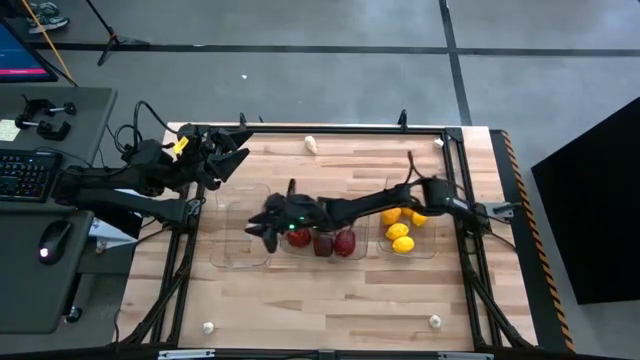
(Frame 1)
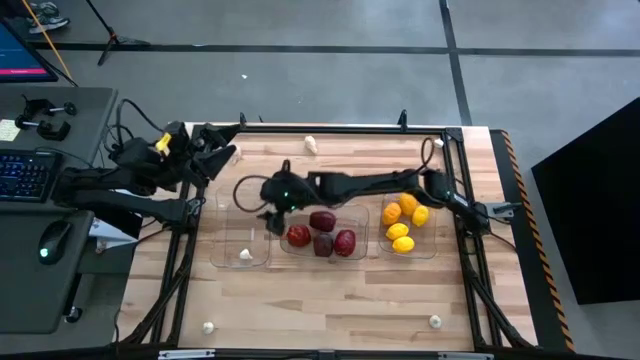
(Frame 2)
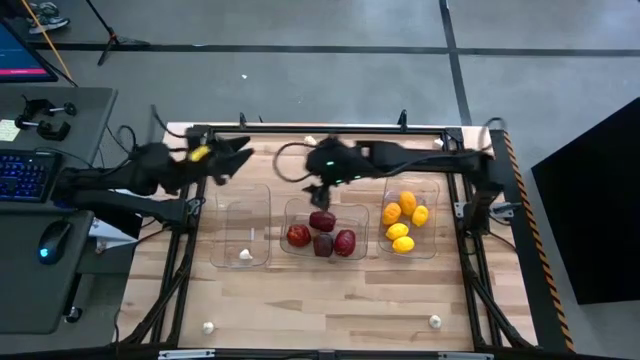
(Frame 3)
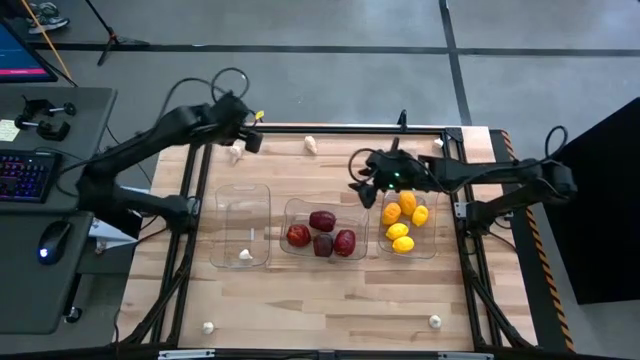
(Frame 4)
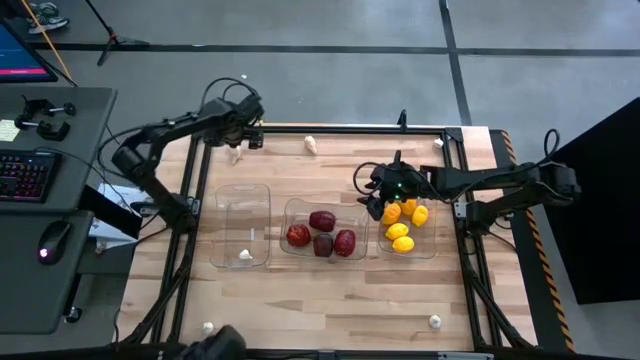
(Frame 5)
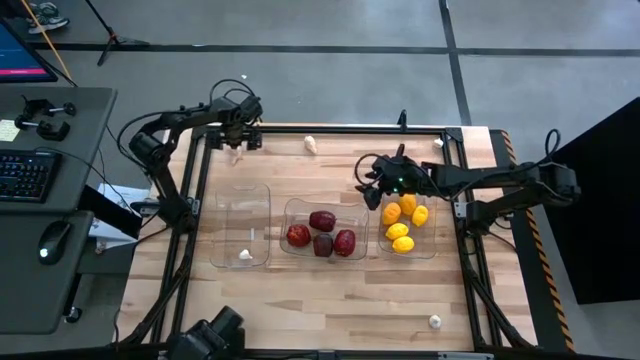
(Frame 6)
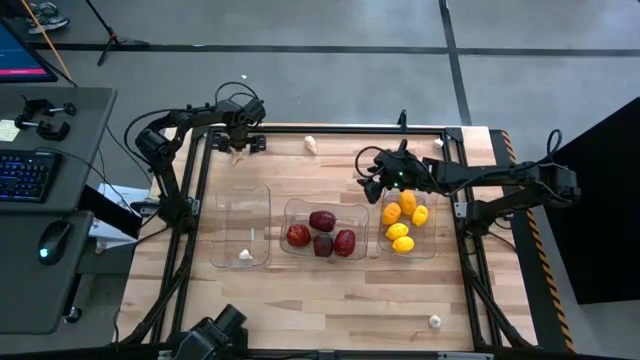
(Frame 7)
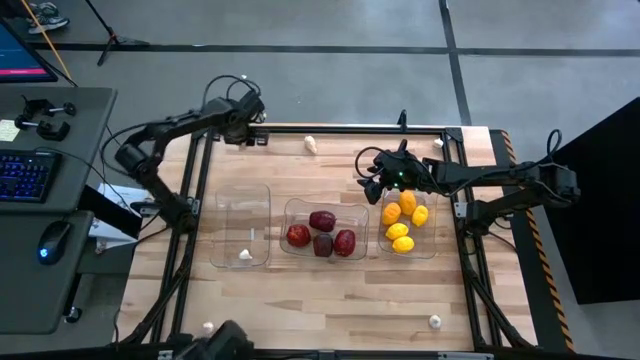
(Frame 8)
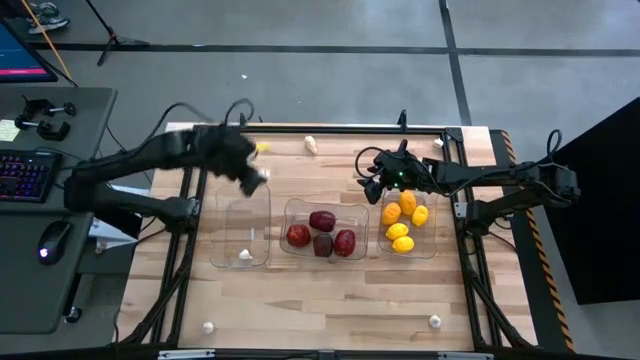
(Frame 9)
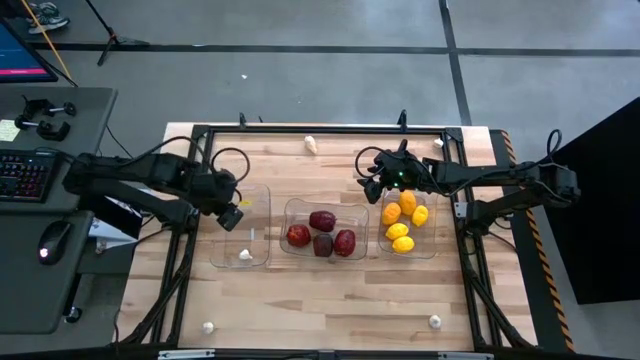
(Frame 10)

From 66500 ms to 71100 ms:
Task: Sort produce into baskets
Put the top left white garlic into the transparent bin

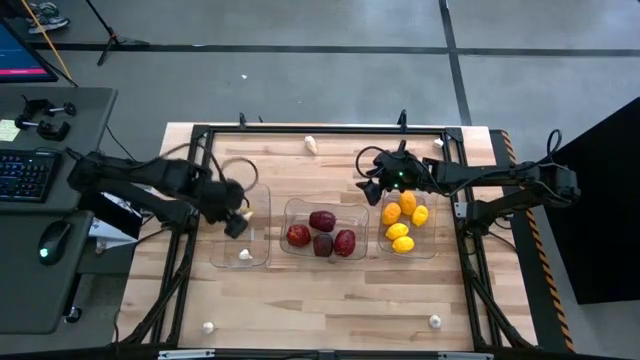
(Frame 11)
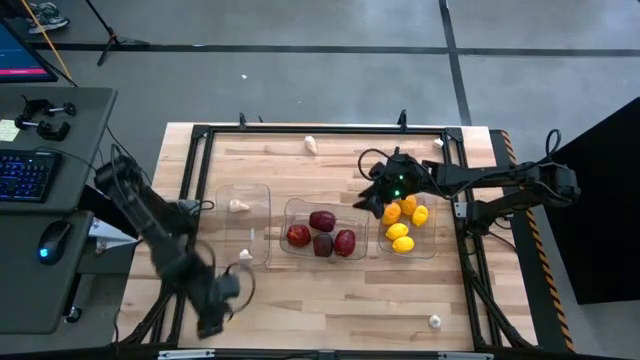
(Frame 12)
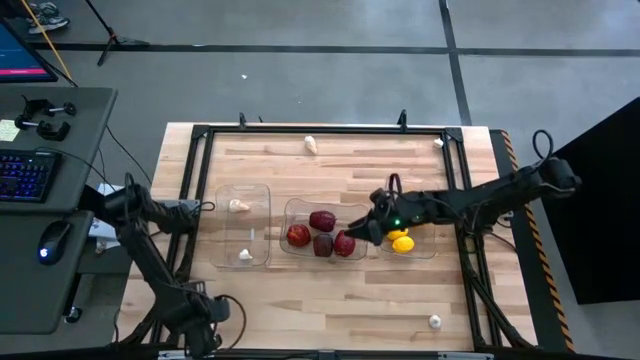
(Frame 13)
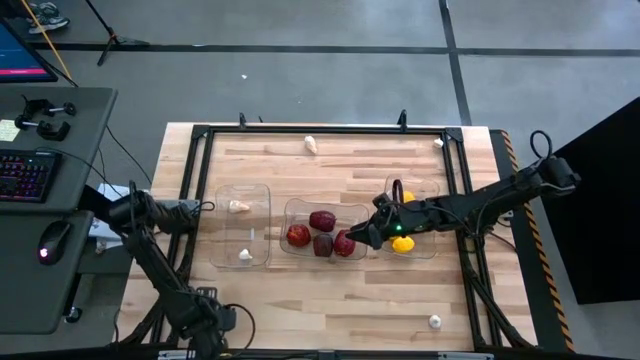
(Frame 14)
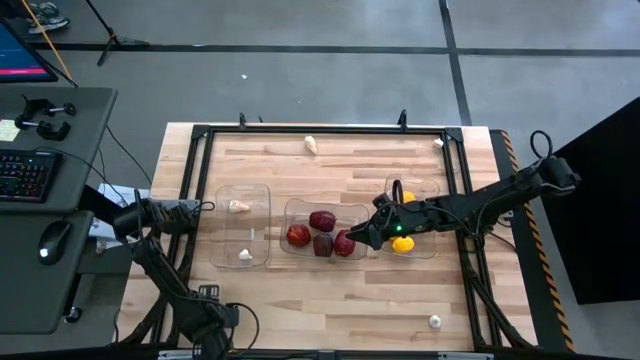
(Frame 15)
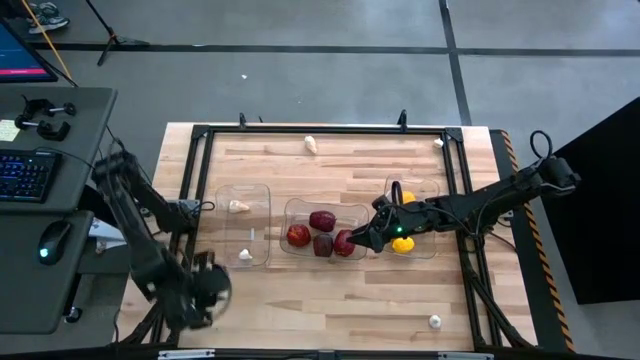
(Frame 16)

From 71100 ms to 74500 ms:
Put the bottom left white garlic into the left transparent bin

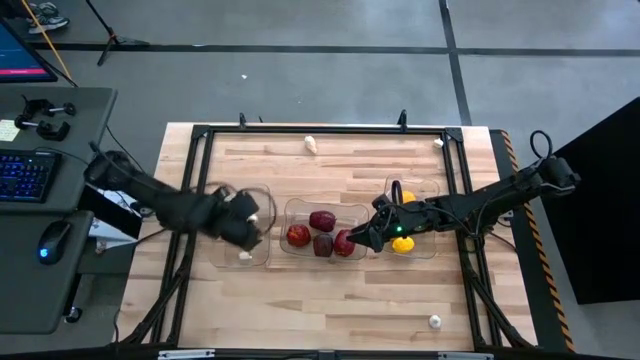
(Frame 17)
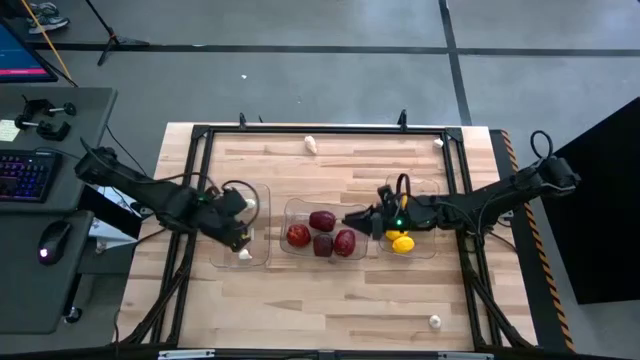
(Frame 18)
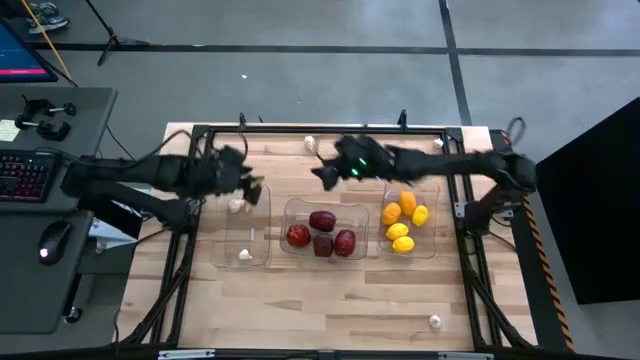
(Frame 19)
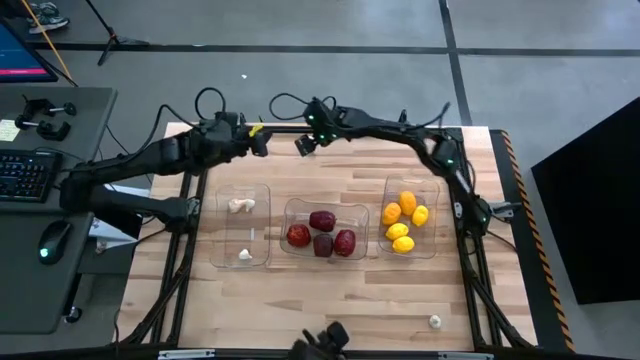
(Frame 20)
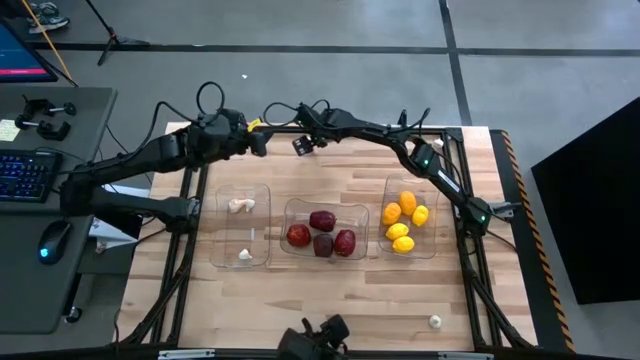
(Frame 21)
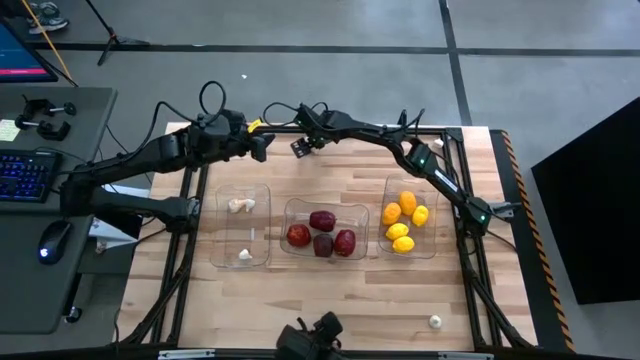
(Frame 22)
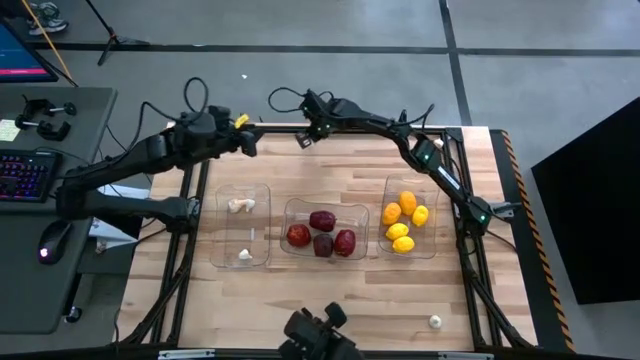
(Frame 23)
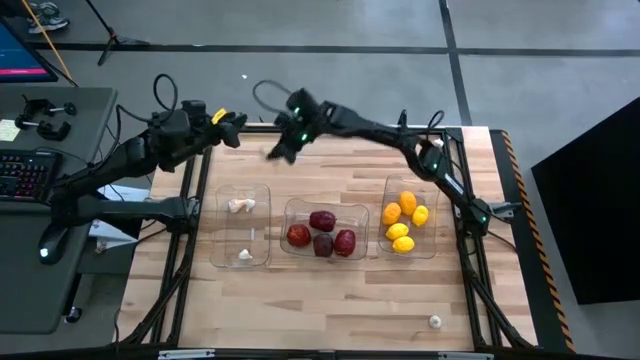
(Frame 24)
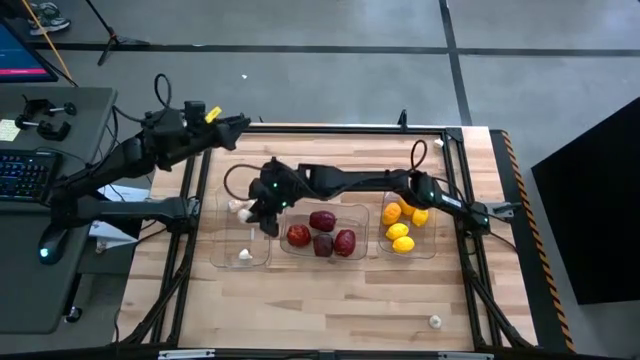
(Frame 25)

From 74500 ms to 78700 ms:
Put the top left white garlic into the left transparent bin

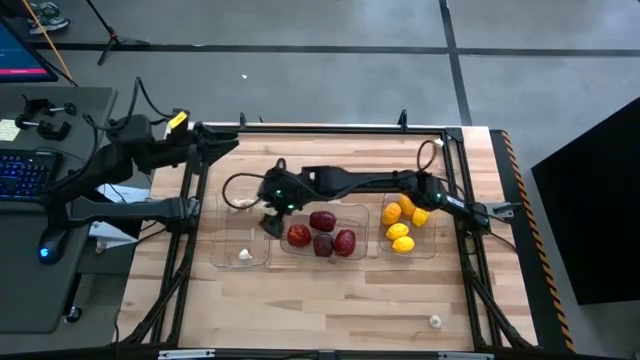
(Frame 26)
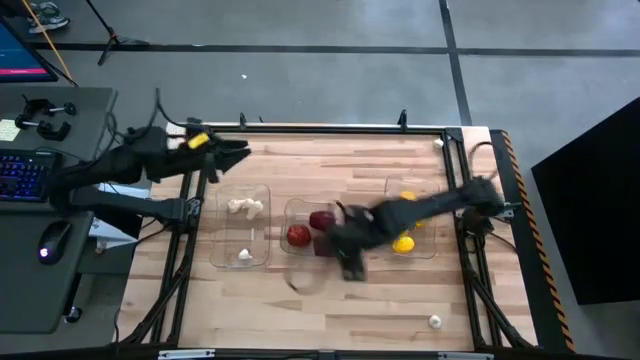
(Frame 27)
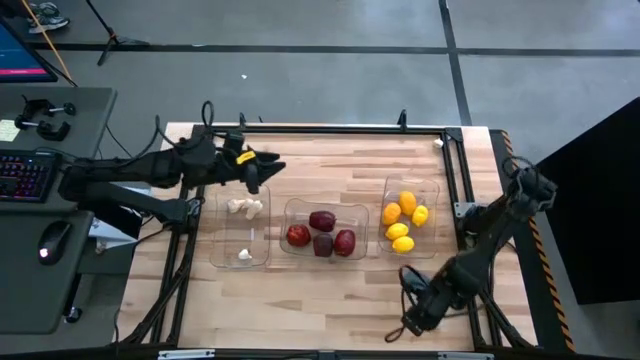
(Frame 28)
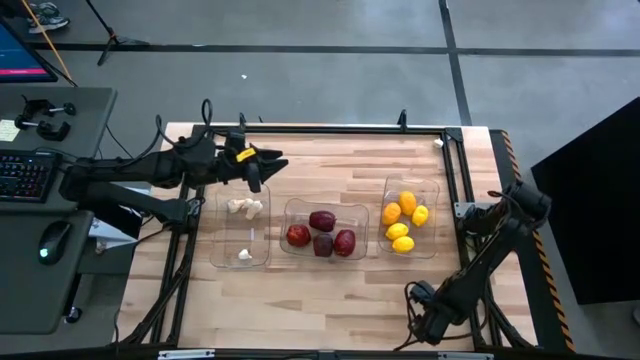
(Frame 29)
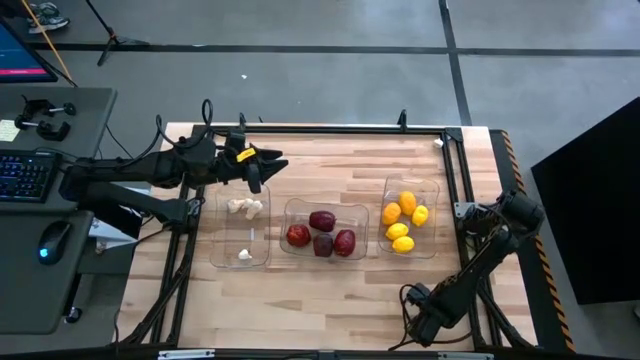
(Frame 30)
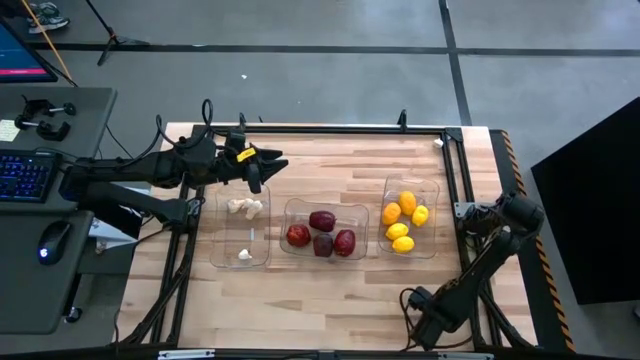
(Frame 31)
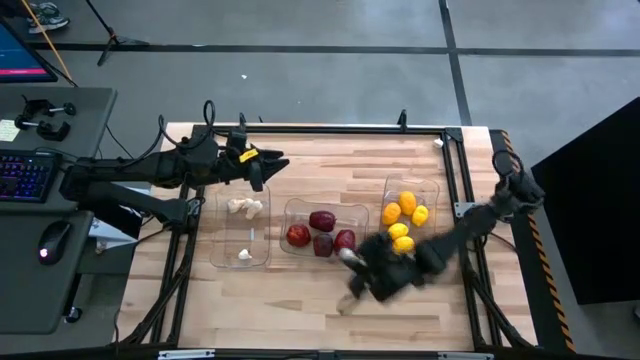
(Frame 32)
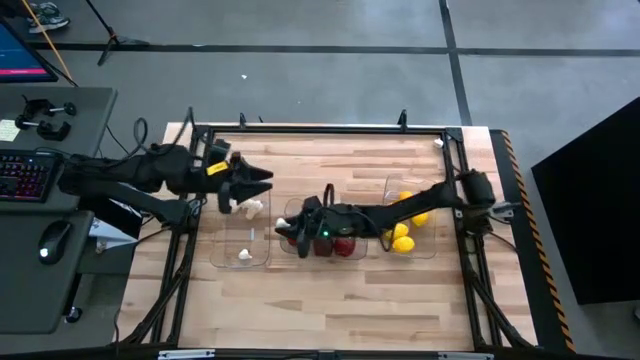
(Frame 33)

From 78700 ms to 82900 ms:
Put the bottom white garlic into the left transparent bin

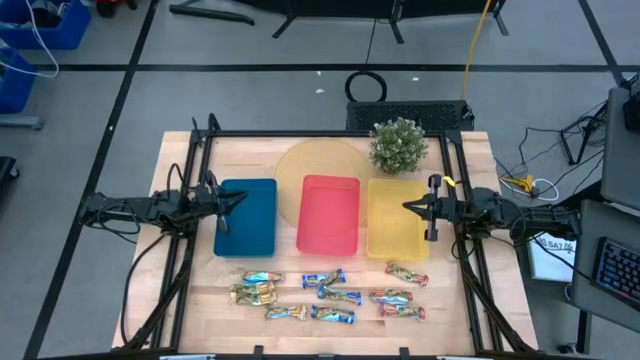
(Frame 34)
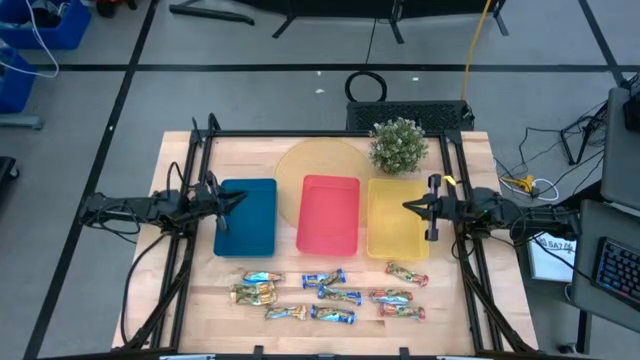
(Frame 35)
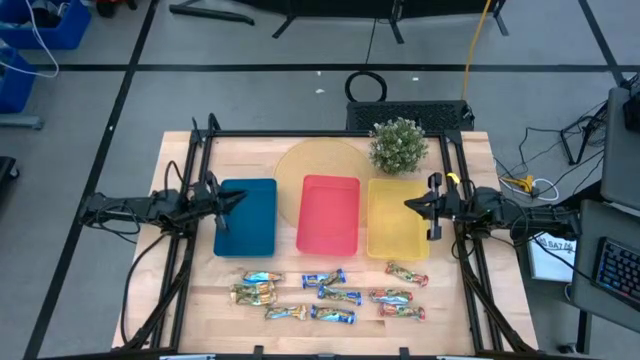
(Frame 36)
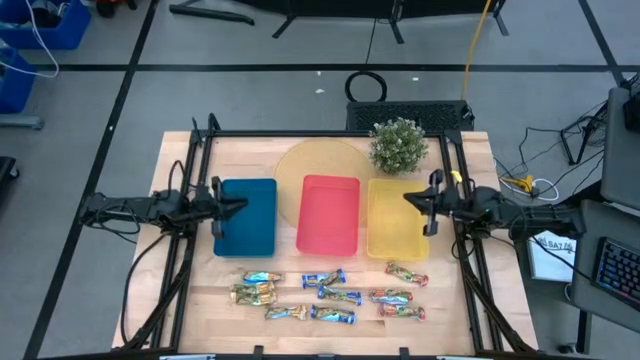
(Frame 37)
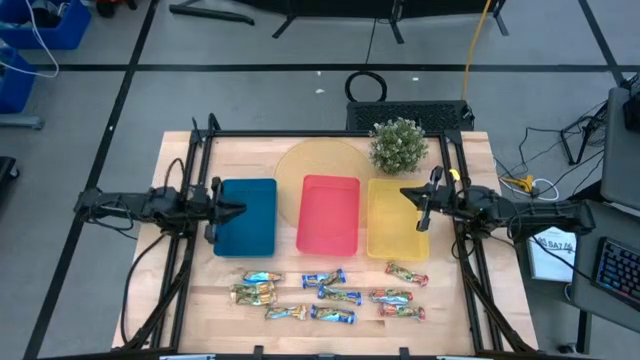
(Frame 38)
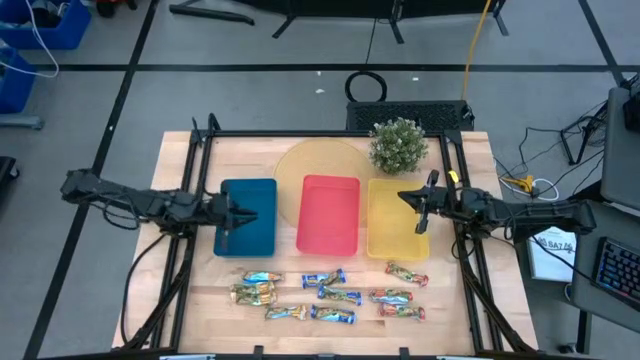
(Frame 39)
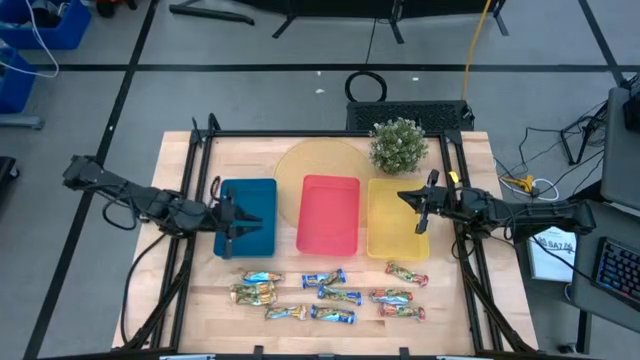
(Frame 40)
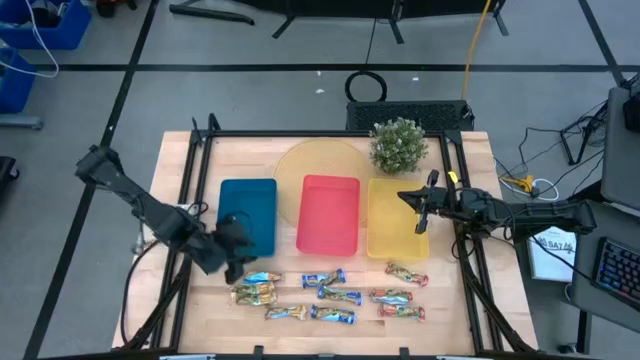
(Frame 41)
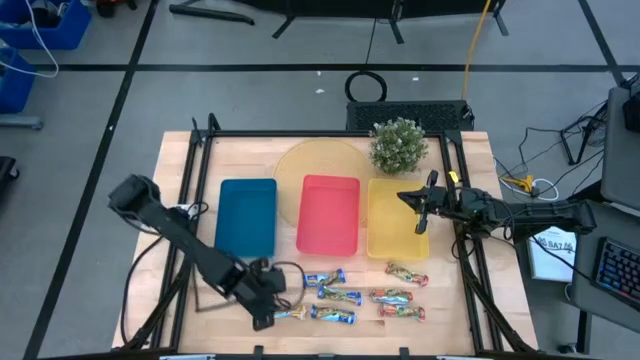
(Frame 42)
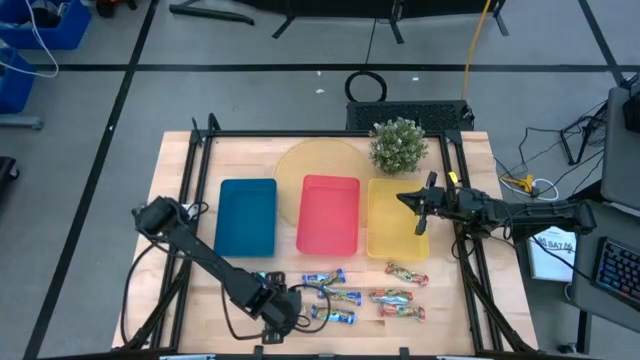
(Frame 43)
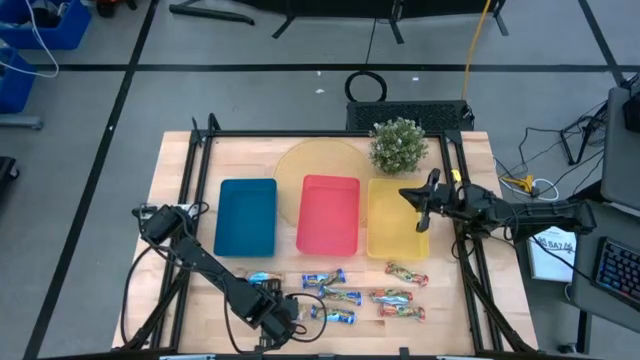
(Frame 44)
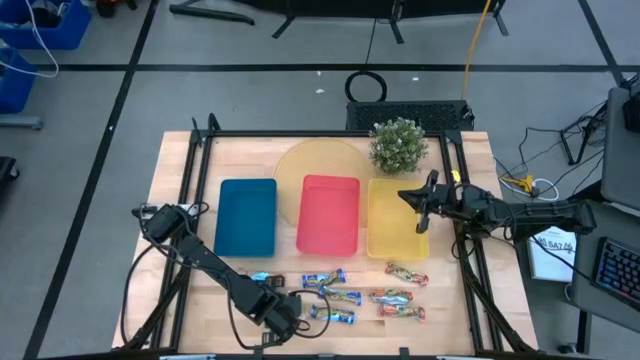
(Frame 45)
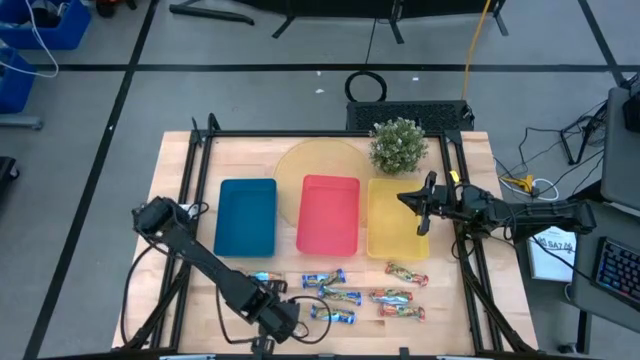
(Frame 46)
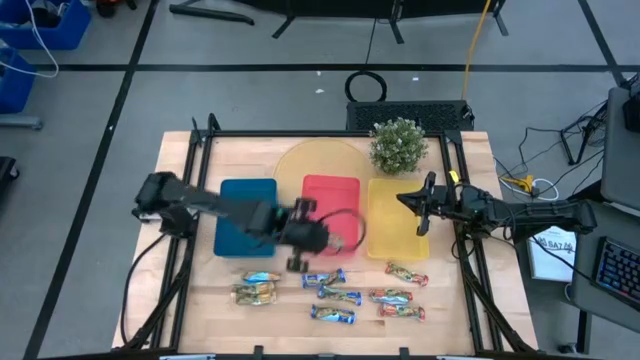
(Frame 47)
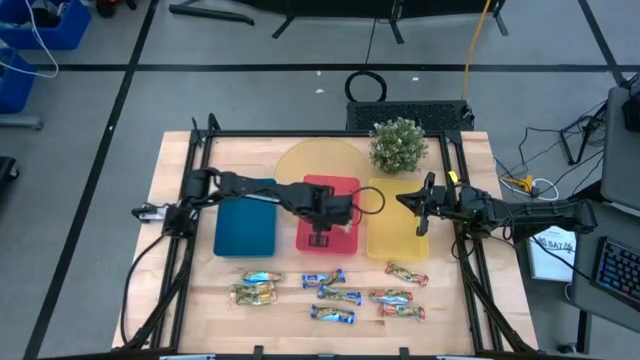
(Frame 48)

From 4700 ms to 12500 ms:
Task: Pick and place Granola Bars by type
Put the yellow granola bar into the red bin
